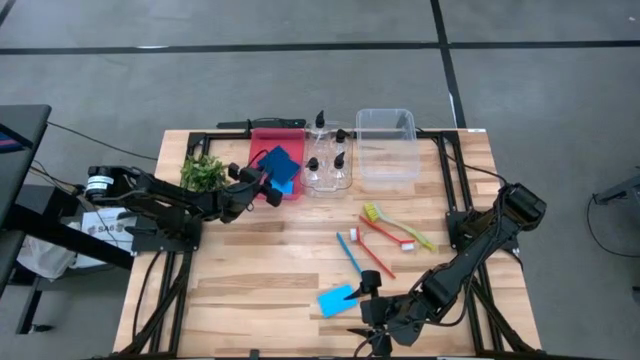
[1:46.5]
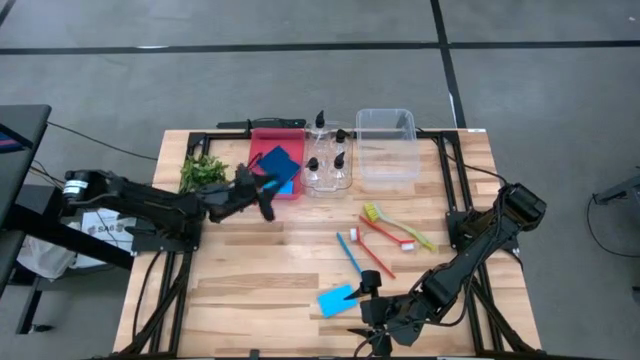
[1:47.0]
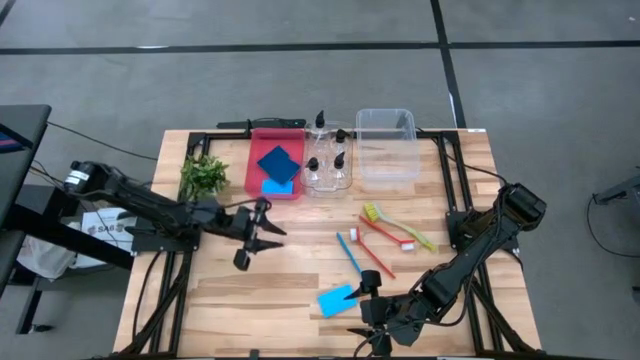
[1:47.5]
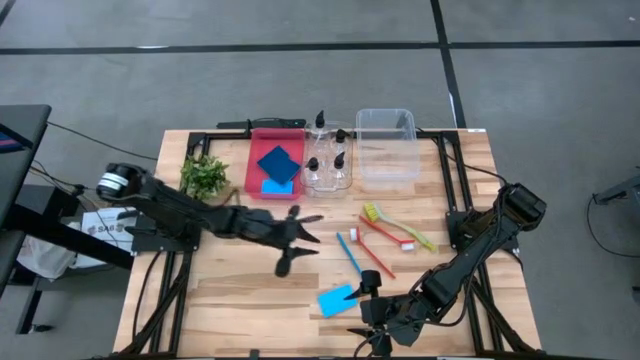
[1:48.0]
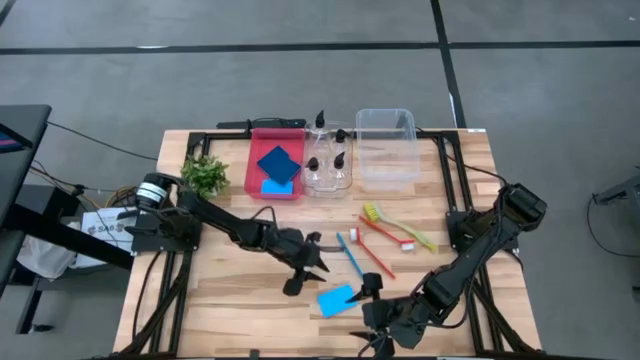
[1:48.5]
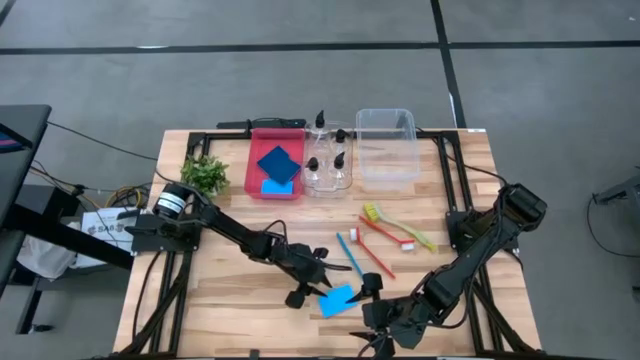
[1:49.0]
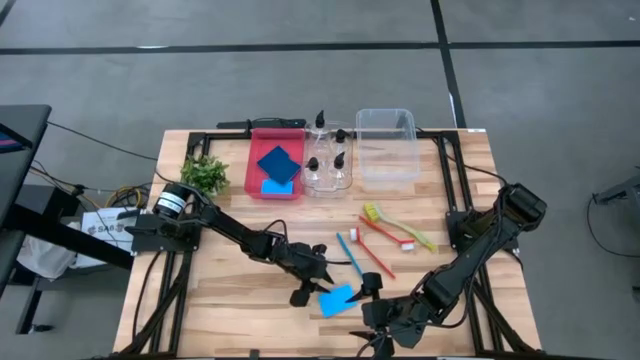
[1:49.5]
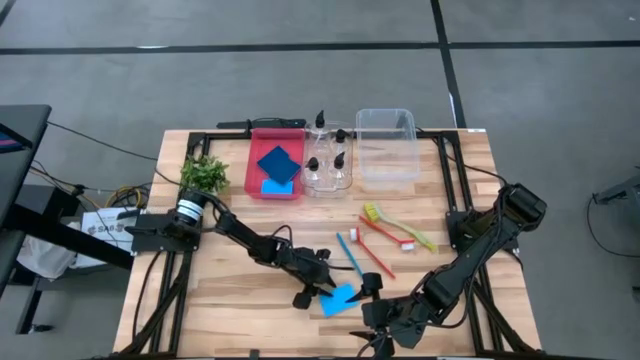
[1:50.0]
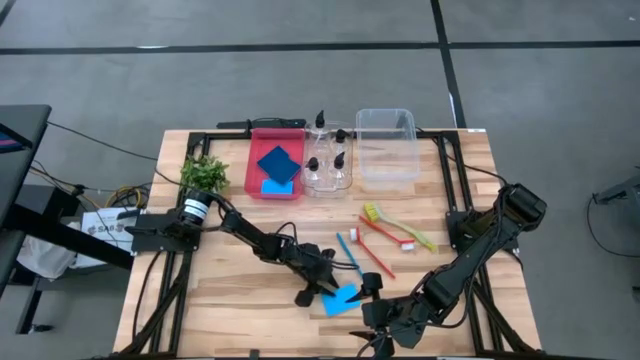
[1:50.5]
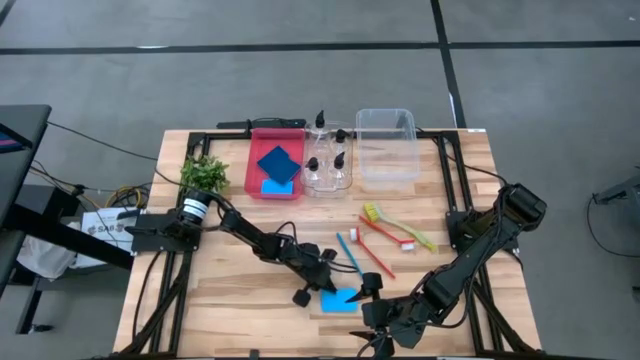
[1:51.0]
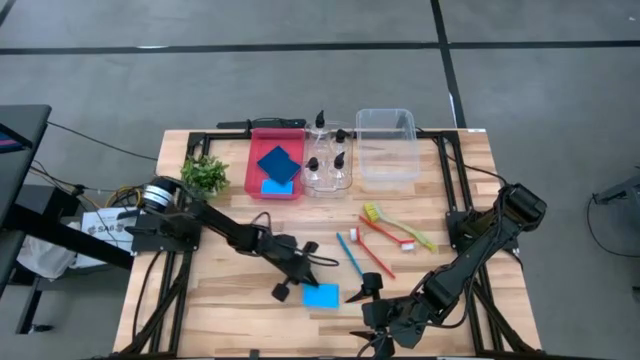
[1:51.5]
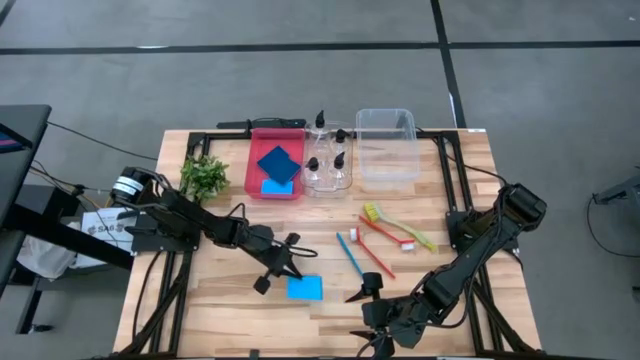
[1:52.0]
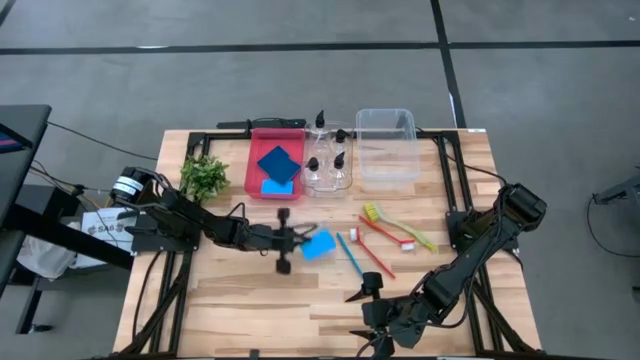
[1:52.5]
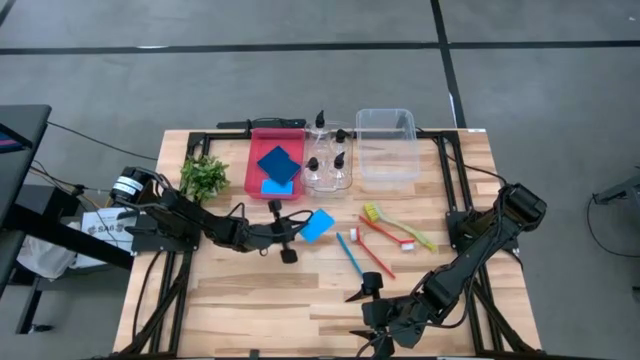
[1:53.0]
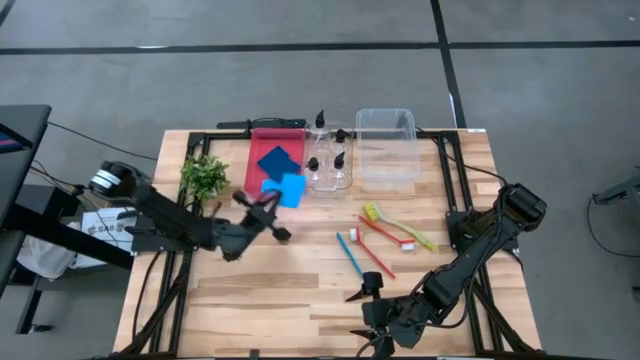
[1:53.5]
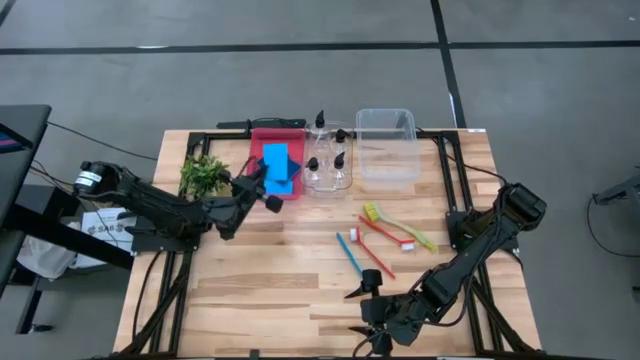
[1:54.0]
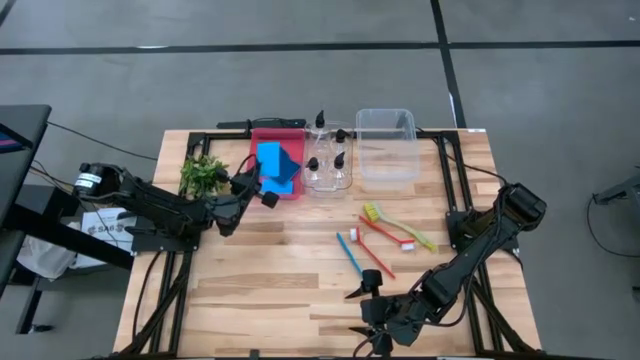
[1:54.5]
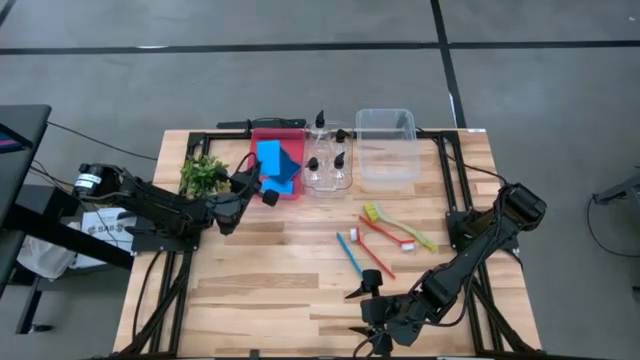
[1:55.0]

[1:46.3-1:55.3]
Task: Pick & Place Kitchen Sink Supplies
Put the blue sponge into the pink bin

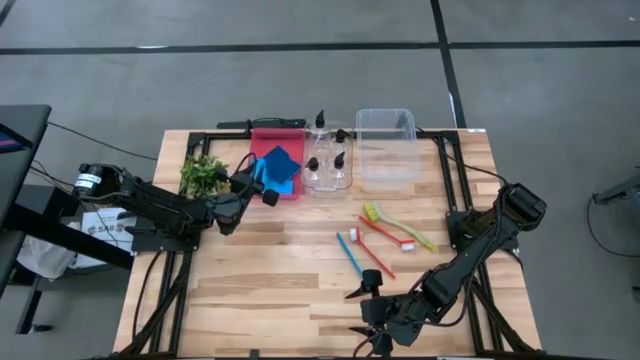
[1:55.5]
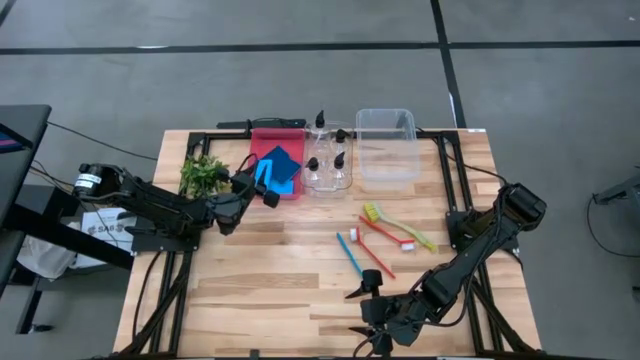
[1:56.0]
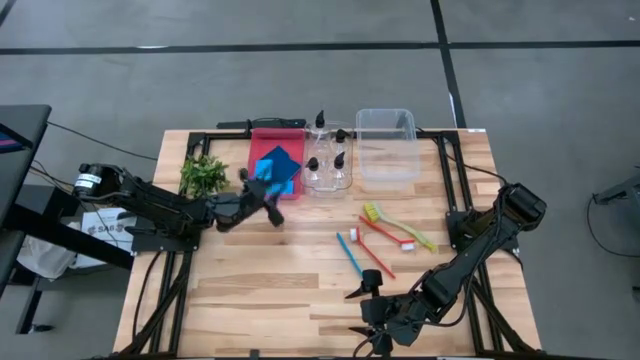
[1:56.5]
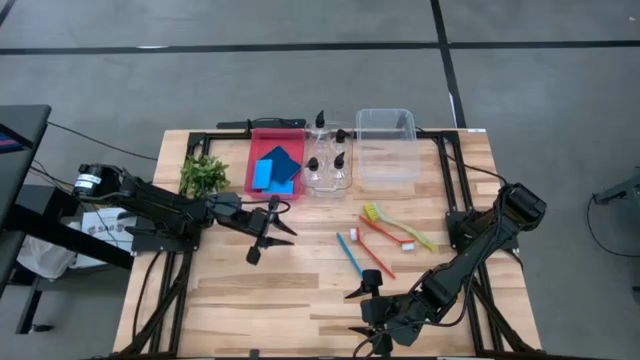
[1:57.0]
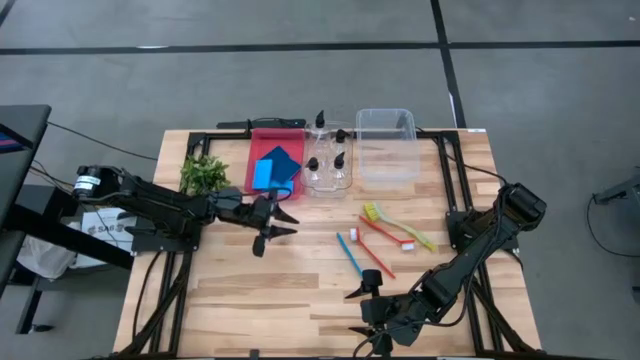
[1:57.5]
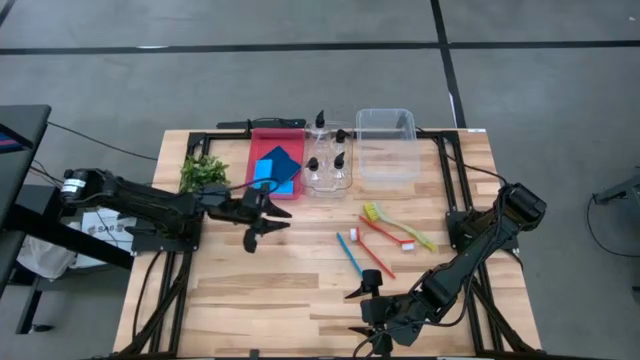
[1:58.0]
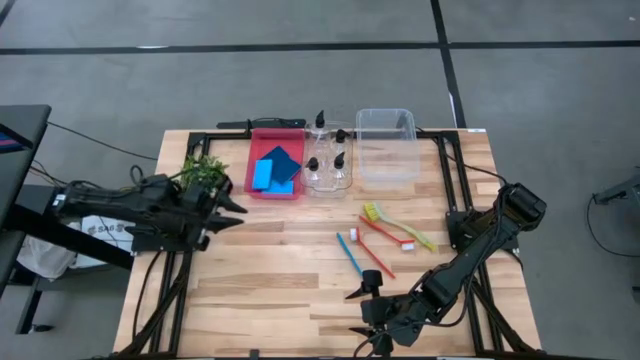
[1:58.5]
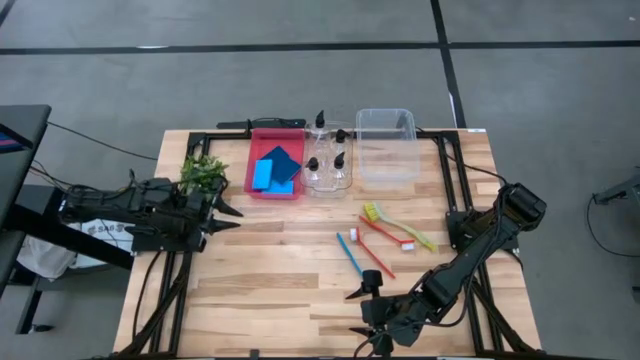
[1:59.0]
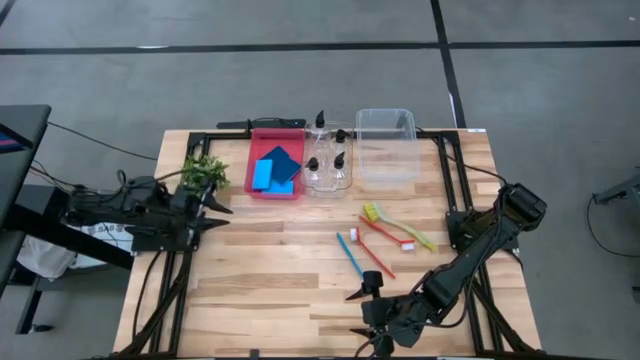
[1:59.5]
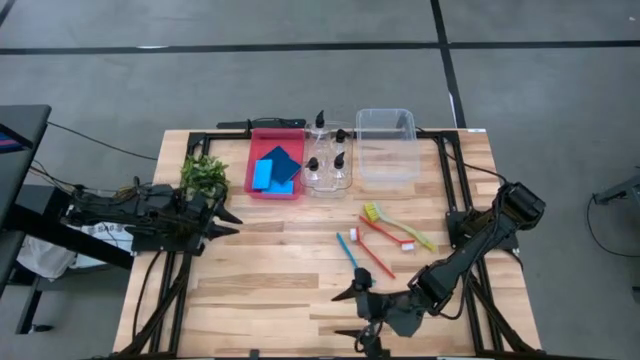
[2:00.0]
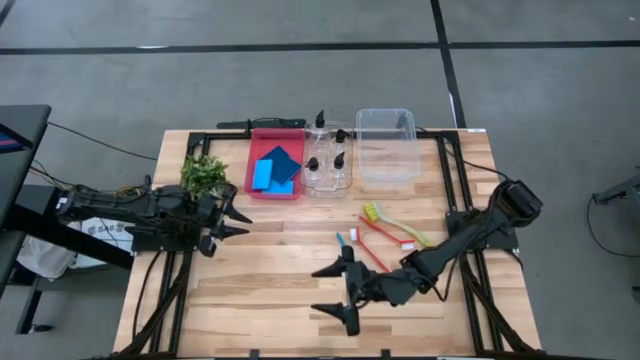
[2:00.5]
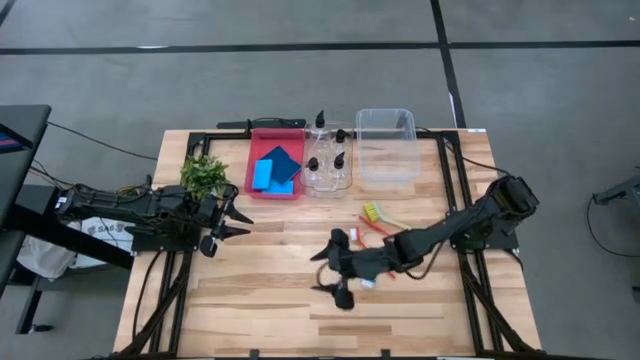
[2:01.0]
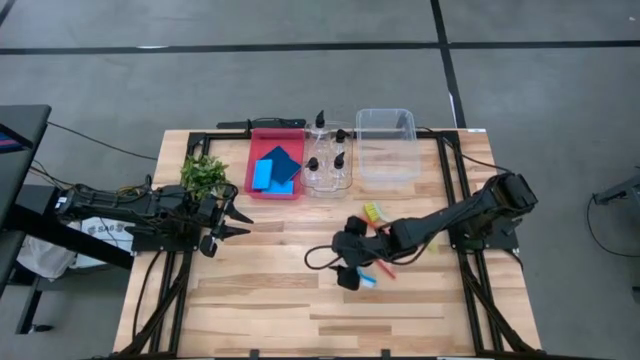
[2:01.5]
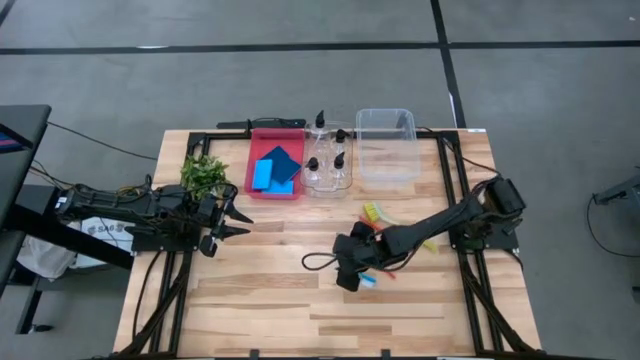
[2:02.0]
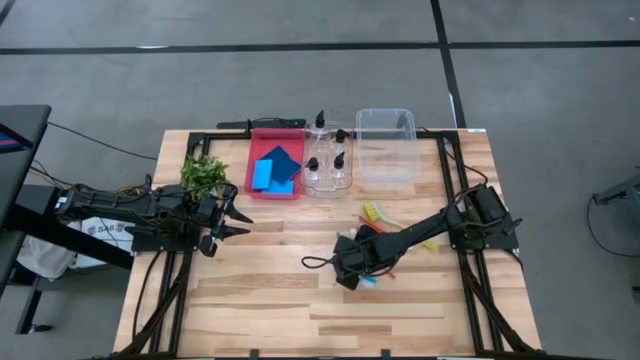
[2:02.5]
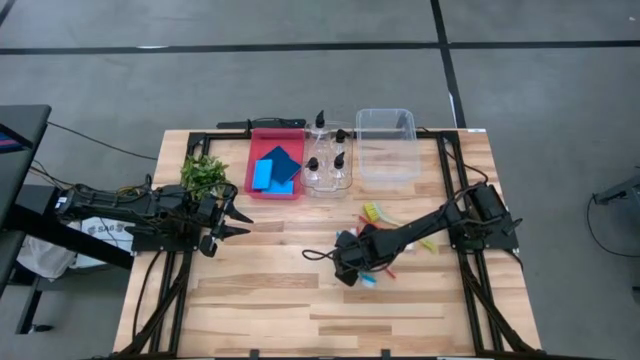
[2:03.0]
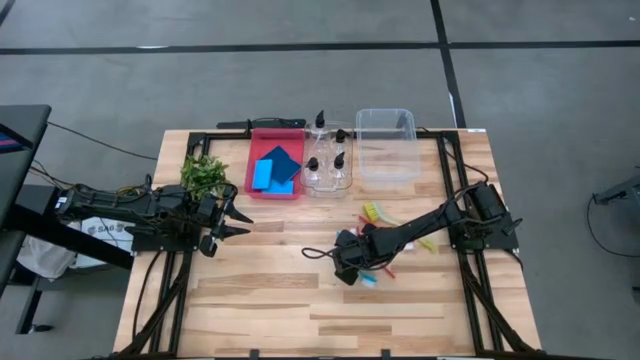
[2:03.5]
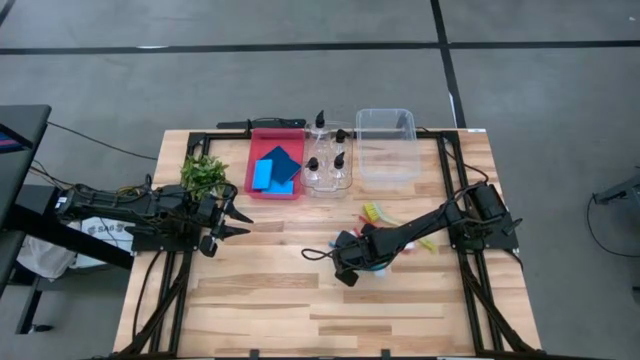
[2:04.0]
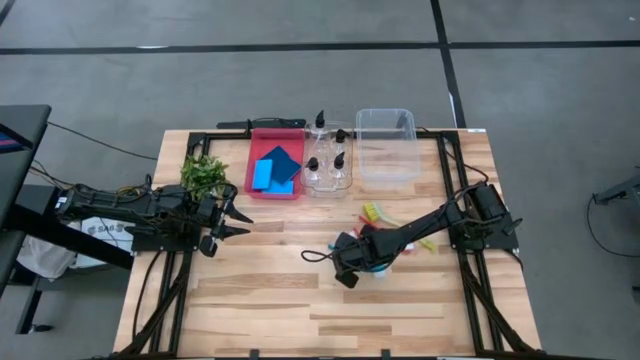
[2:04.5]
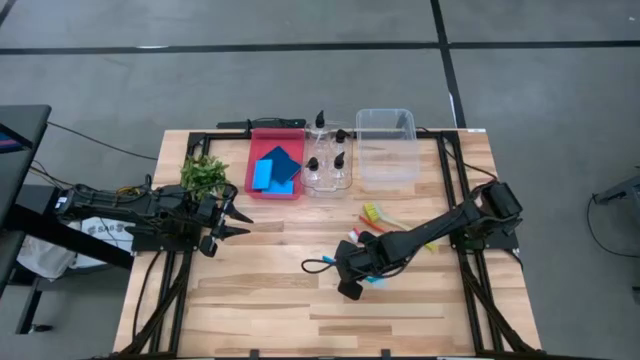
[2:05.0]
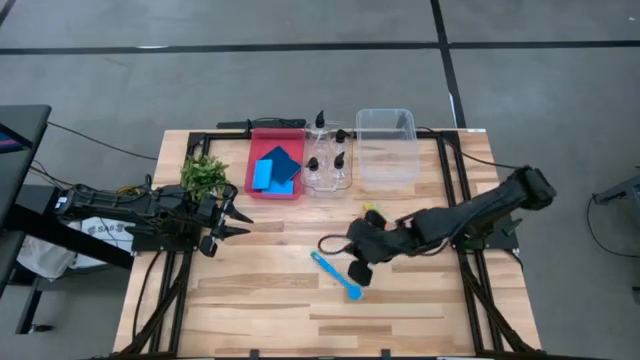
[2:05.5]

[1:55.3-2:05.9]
Put the blue dish brush into the right transparent bin

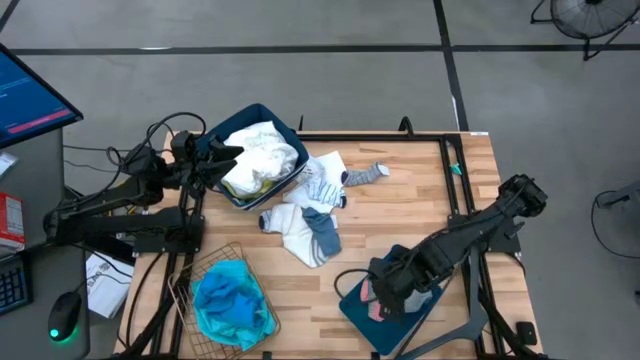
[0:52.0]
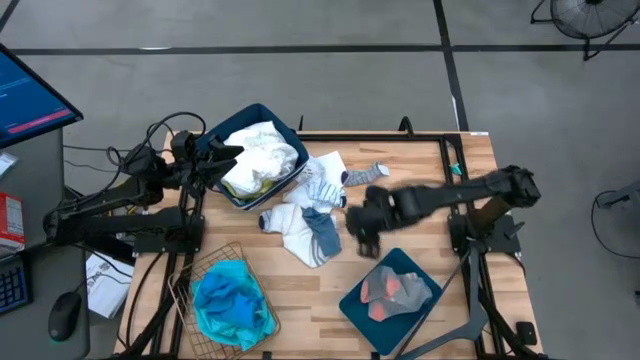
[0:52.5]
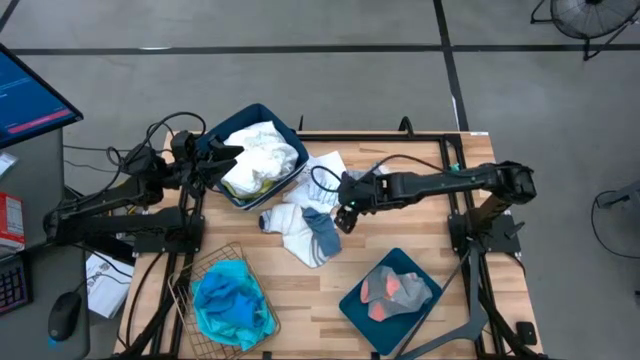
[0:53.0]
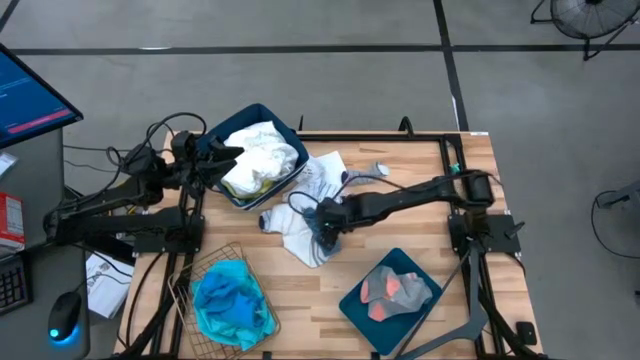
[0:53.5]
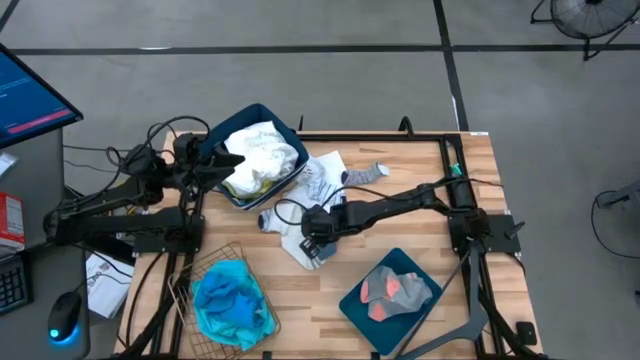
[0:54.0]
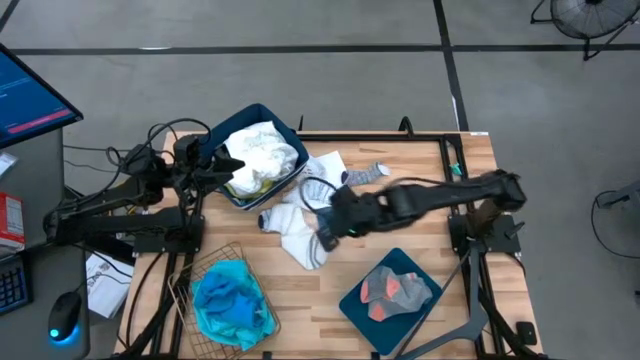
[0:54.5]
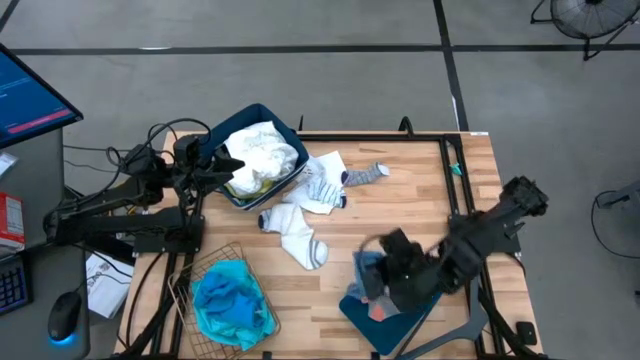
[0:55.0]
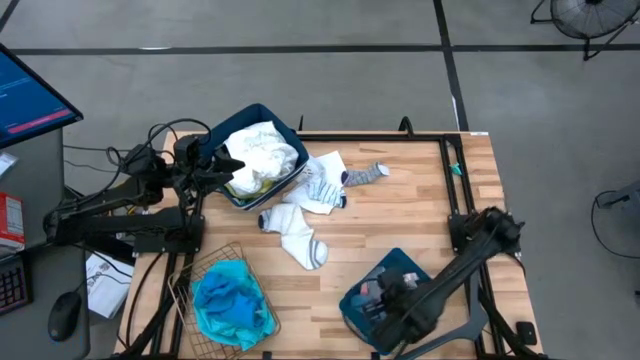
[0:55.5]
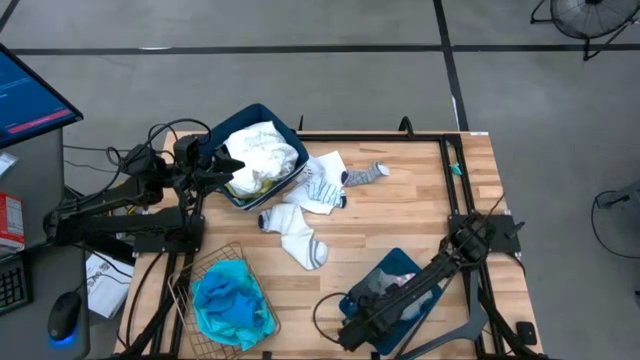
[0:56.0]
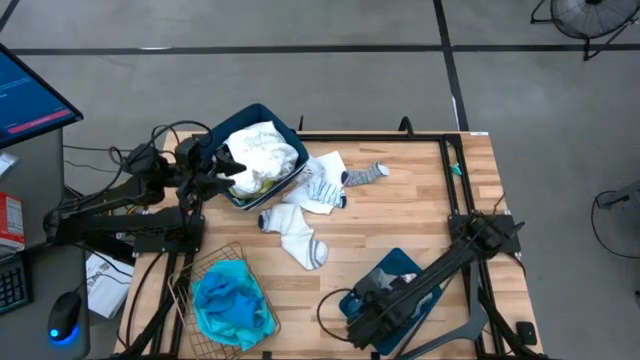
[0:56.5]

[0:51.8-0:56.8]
Task: Pick & Place Cloths
Put the blue sock into the blue bin
